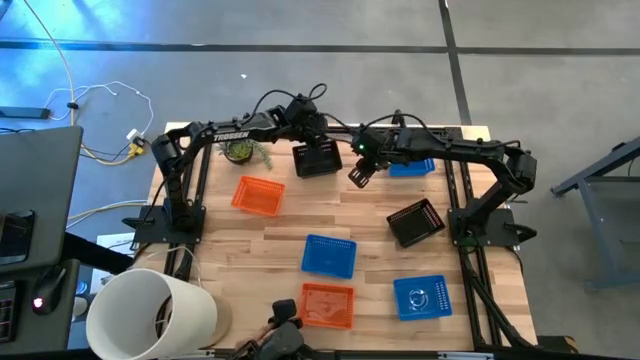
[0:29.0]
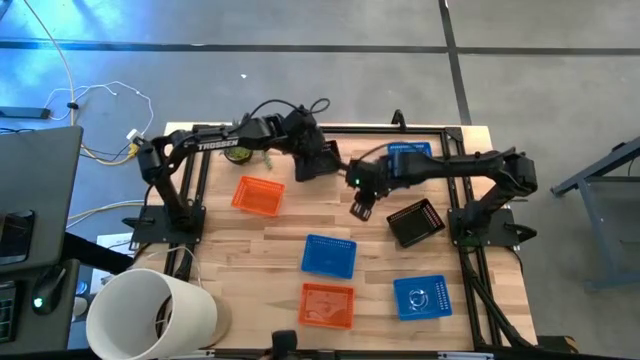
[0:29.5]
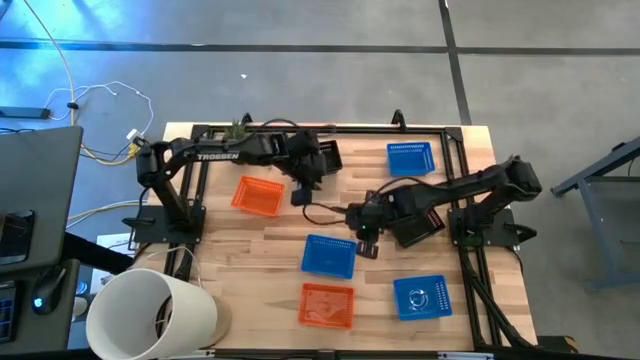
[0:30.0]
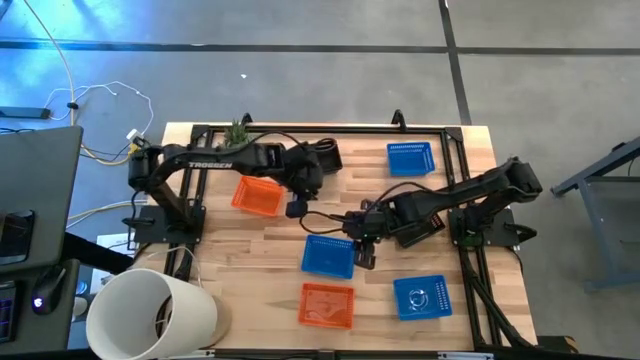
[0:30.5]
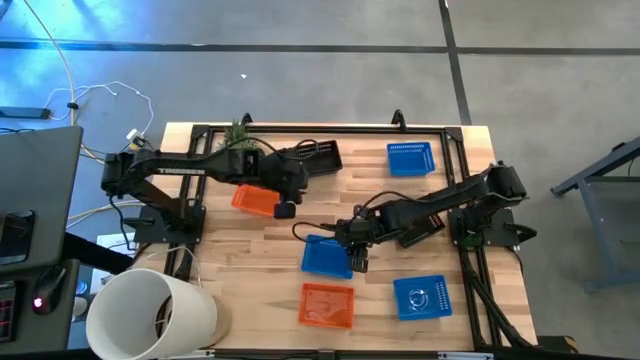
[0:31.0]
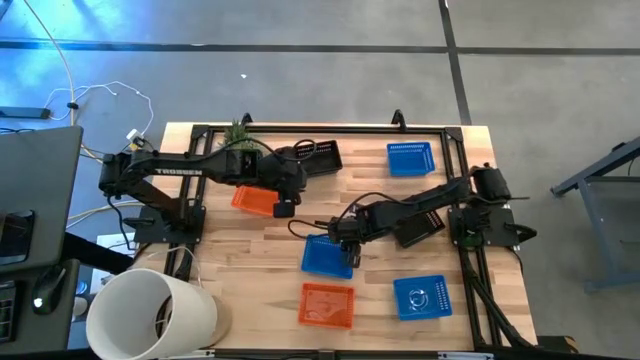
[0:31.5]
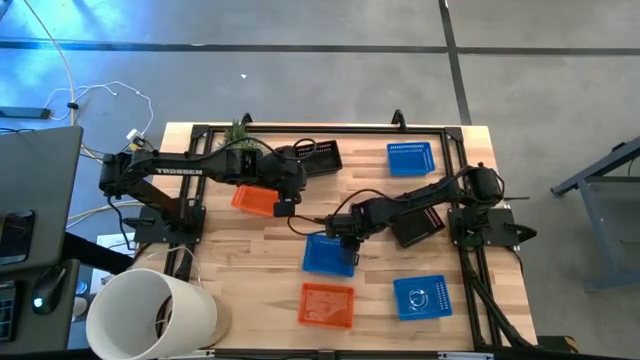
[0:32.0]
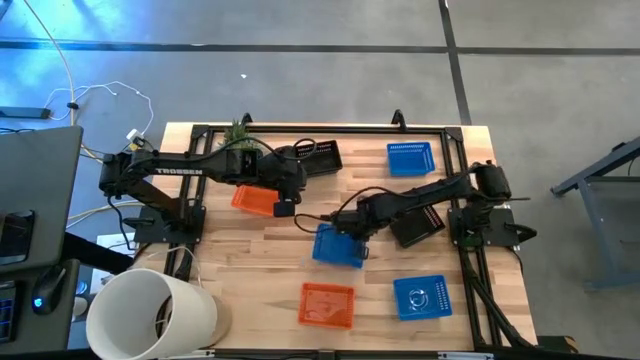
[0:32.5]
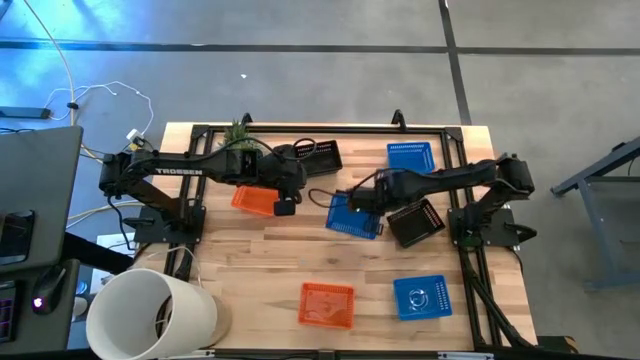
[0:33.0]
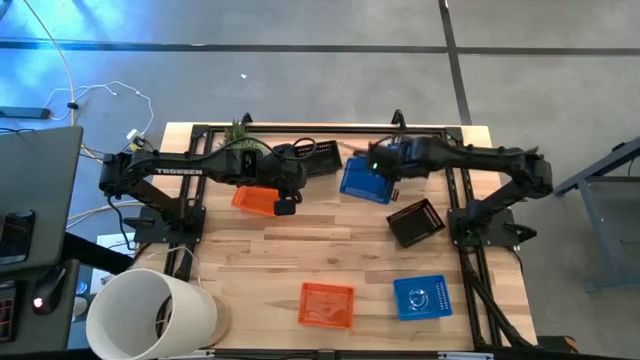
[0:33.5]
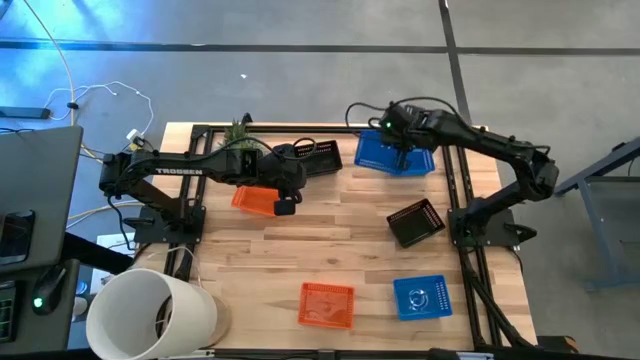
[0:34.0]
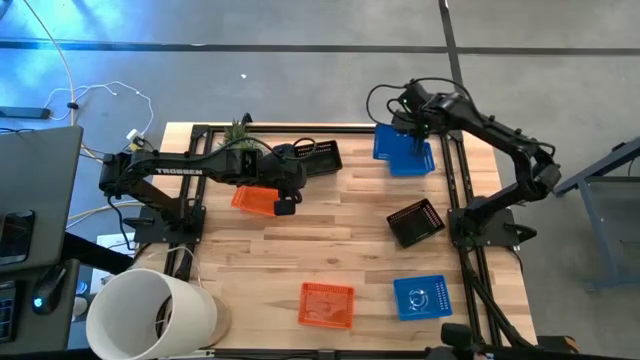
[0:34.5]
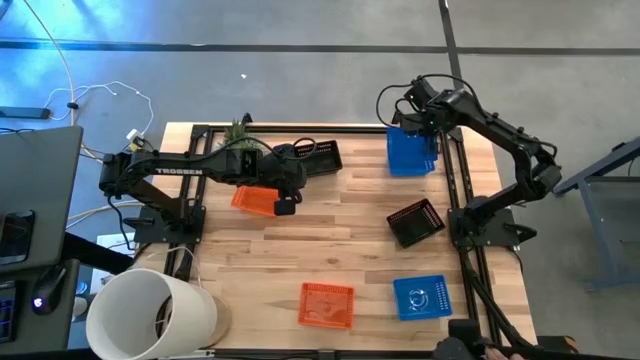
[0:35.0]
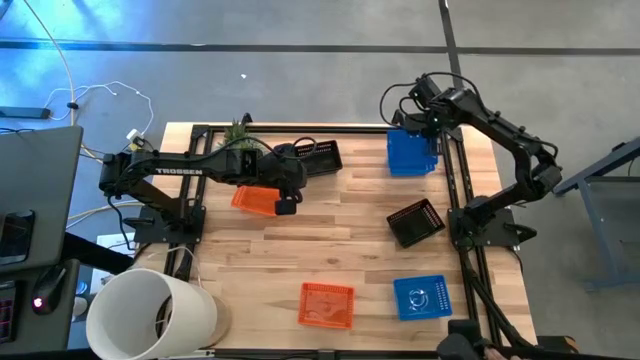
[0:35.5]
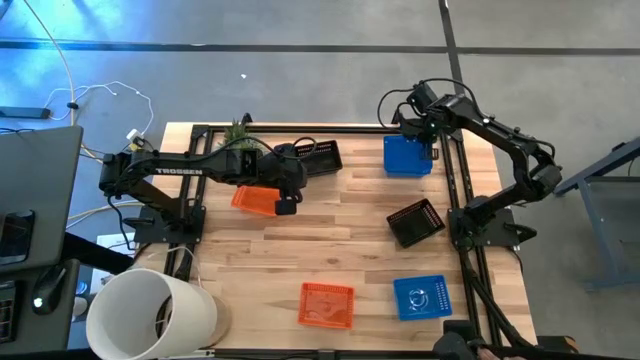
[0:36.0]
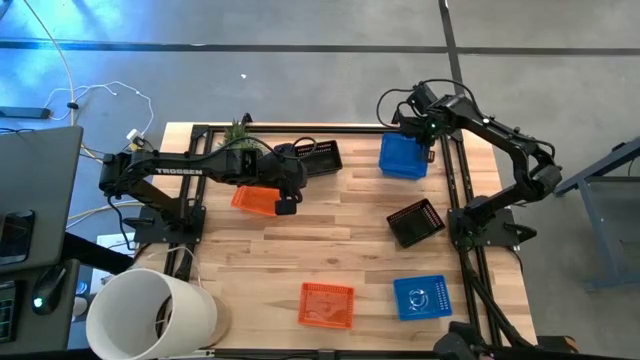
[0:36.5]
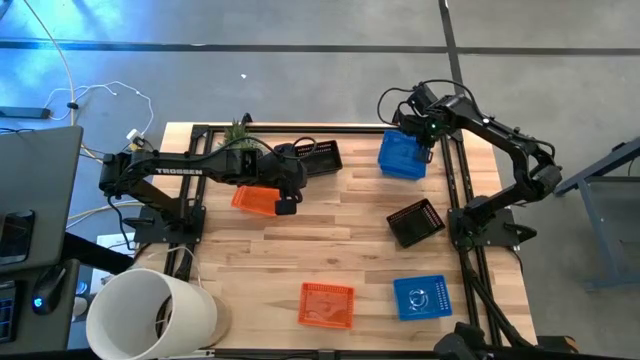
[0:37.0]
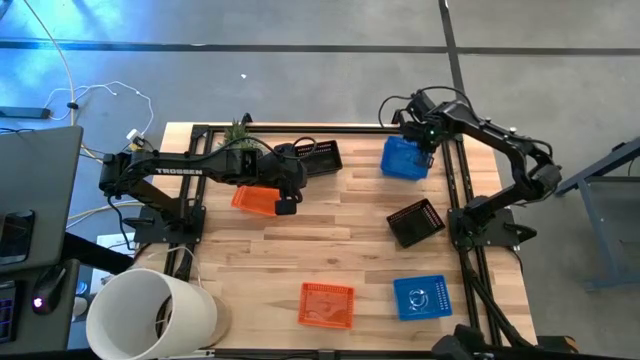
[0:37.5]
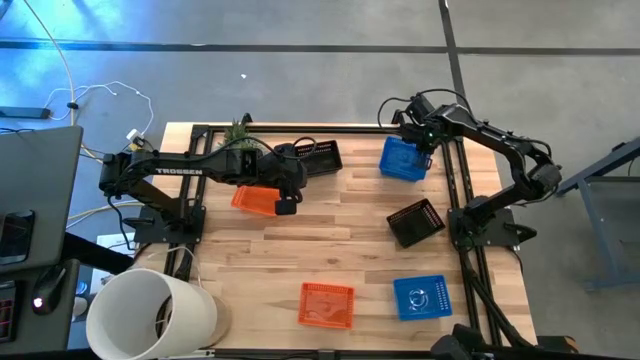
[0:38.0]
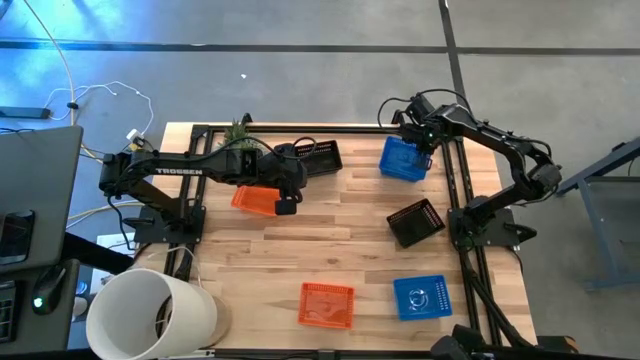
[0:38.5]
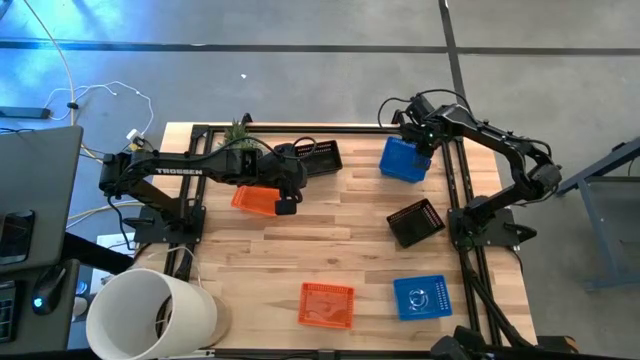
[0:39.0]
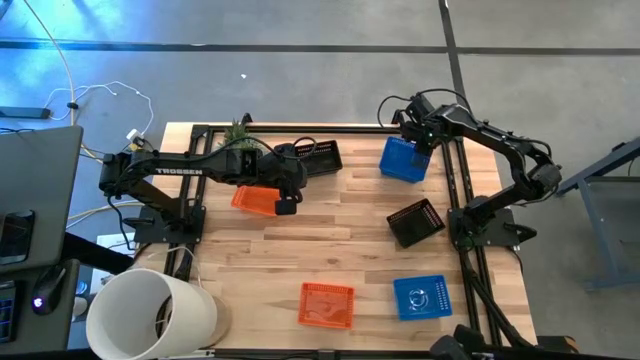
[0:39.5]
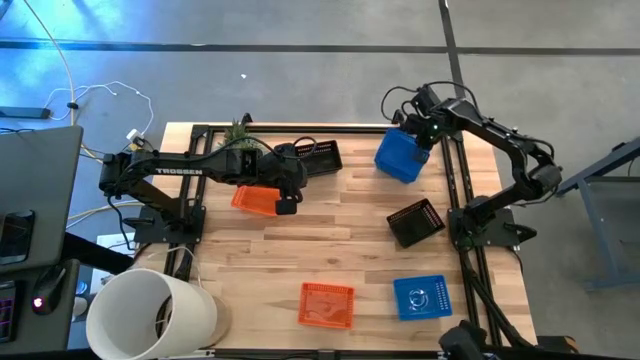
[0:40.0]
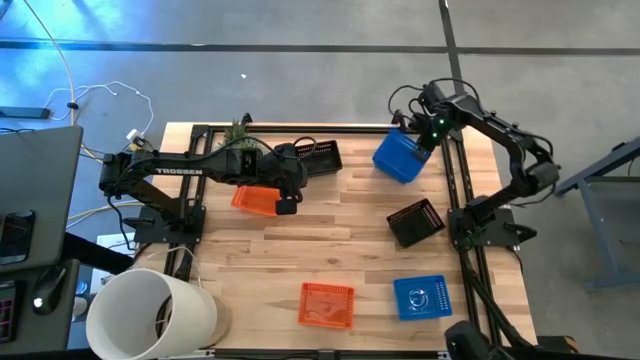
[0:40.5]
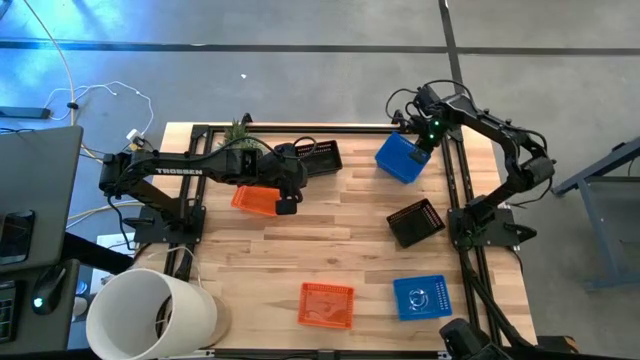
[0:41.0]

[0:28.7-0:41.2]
Stack the left blue basket on top of the top right blue basket
